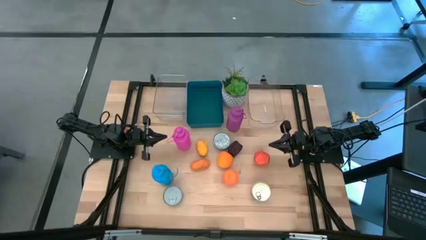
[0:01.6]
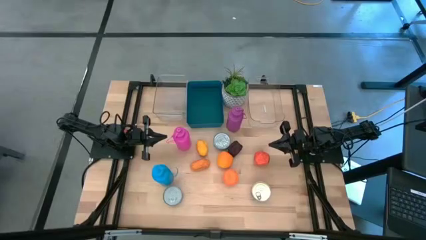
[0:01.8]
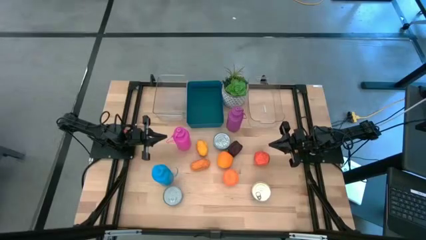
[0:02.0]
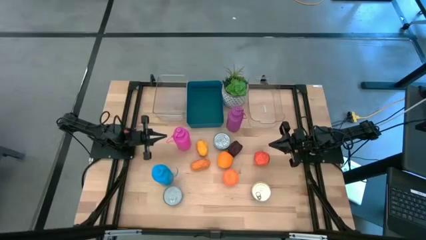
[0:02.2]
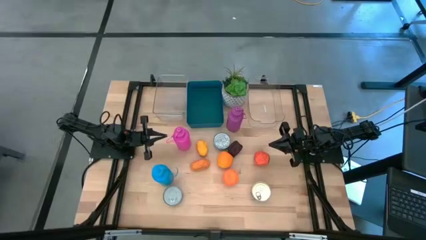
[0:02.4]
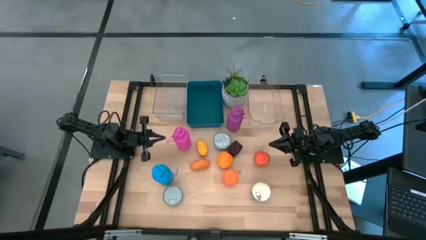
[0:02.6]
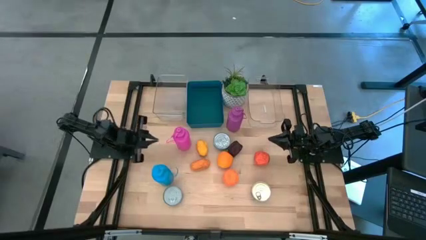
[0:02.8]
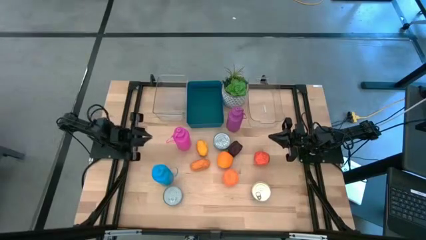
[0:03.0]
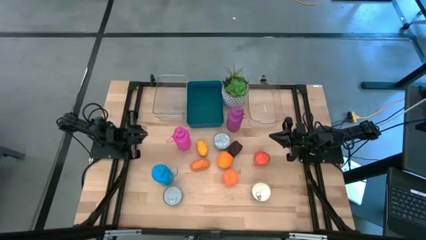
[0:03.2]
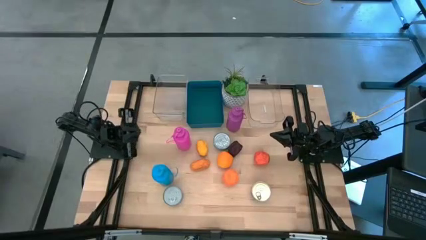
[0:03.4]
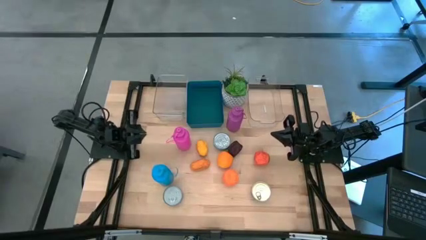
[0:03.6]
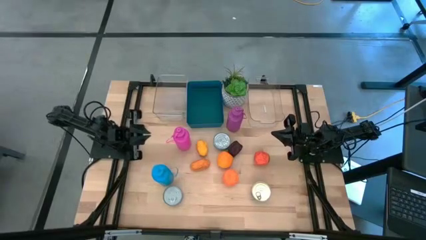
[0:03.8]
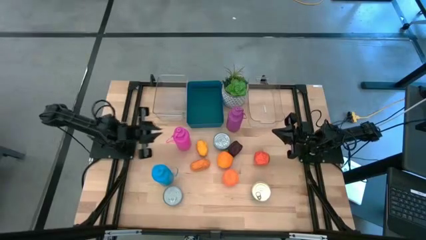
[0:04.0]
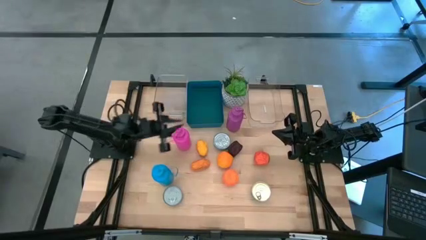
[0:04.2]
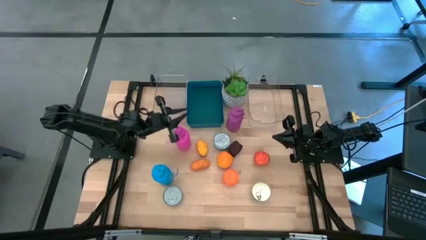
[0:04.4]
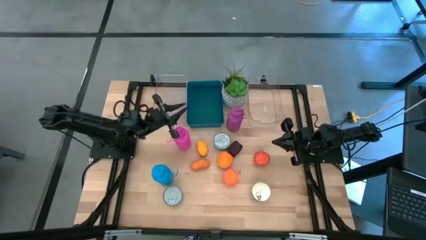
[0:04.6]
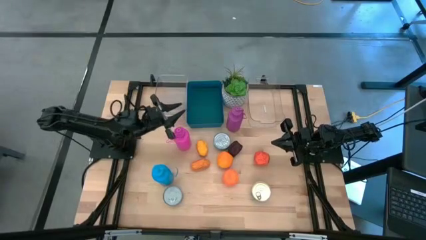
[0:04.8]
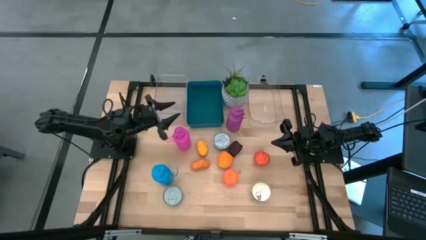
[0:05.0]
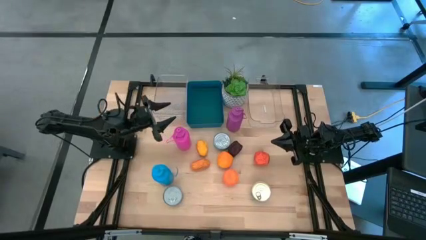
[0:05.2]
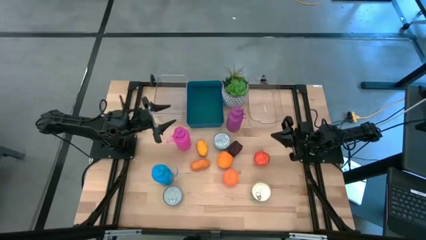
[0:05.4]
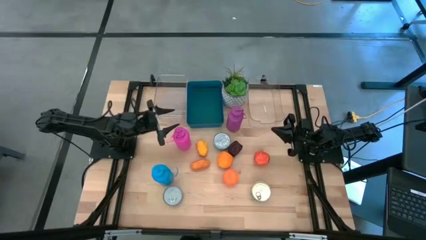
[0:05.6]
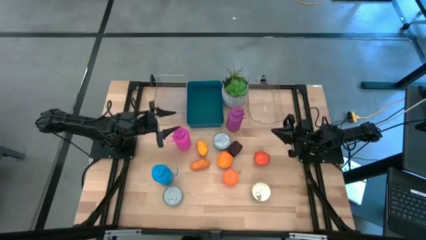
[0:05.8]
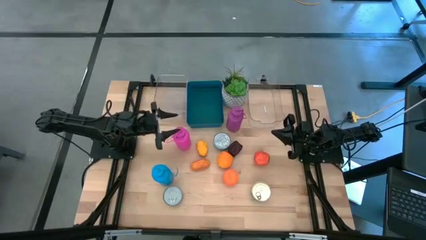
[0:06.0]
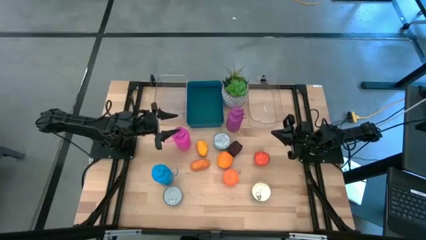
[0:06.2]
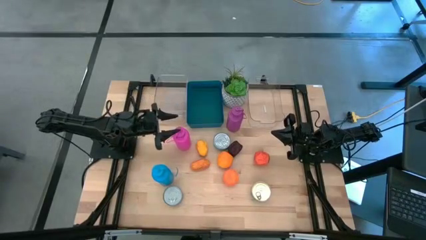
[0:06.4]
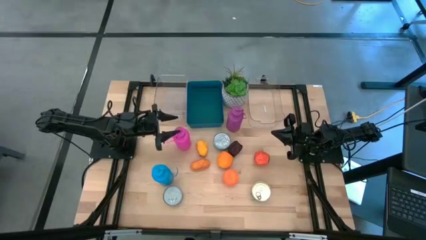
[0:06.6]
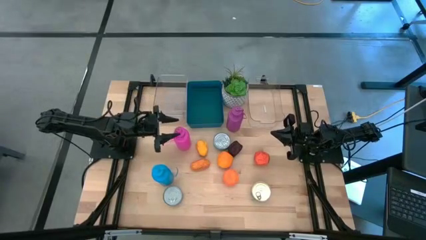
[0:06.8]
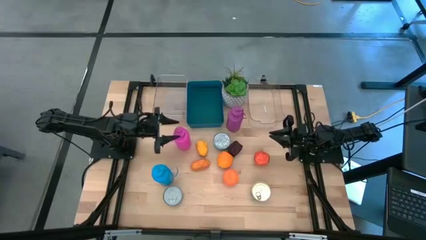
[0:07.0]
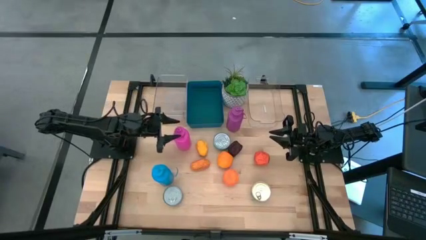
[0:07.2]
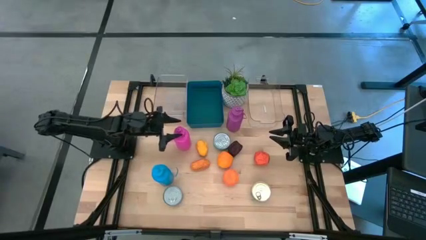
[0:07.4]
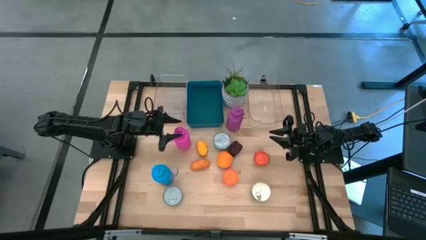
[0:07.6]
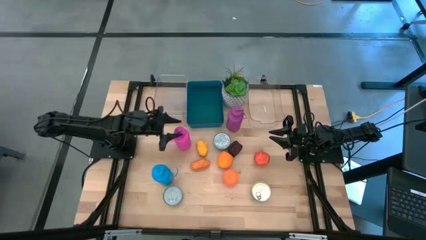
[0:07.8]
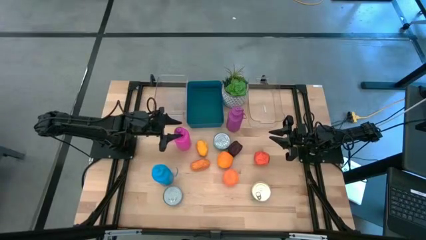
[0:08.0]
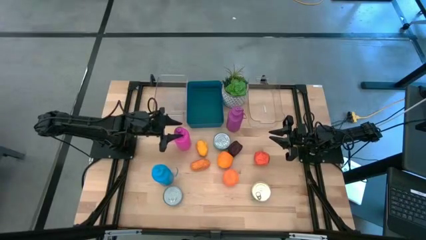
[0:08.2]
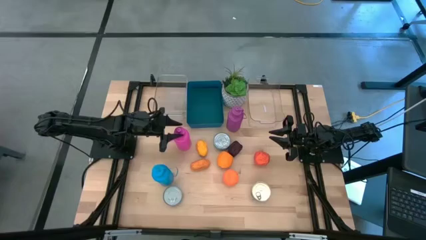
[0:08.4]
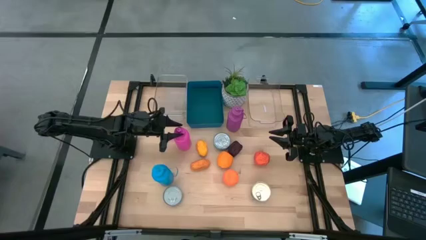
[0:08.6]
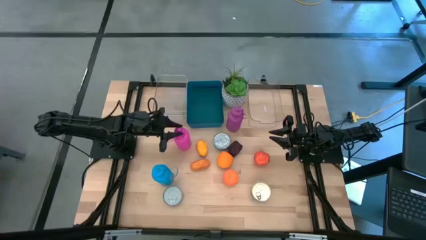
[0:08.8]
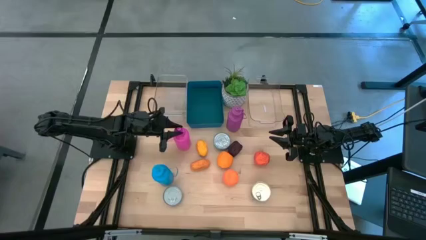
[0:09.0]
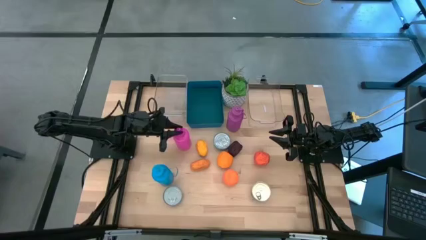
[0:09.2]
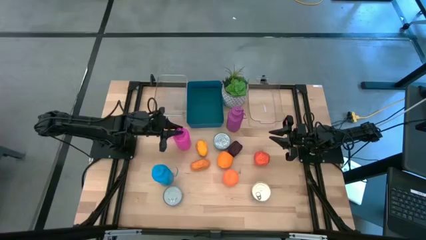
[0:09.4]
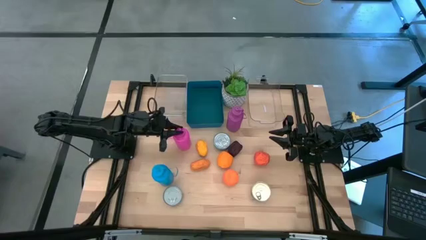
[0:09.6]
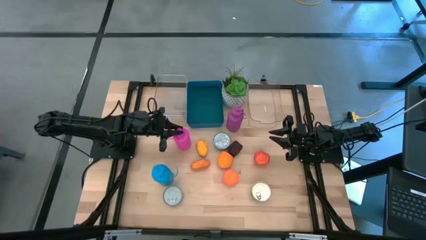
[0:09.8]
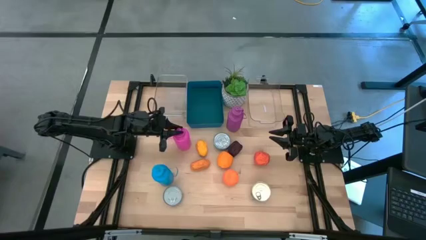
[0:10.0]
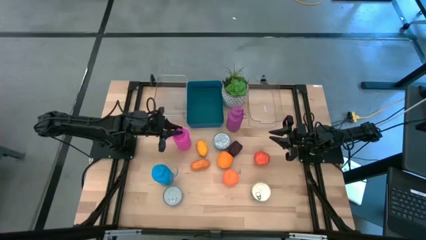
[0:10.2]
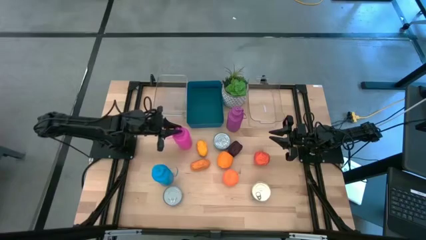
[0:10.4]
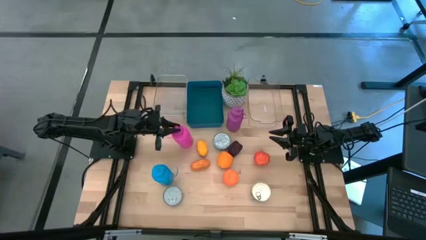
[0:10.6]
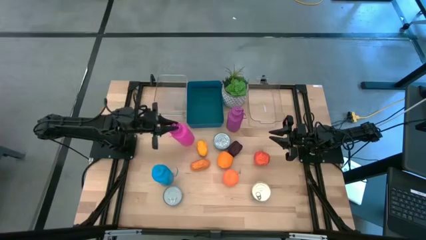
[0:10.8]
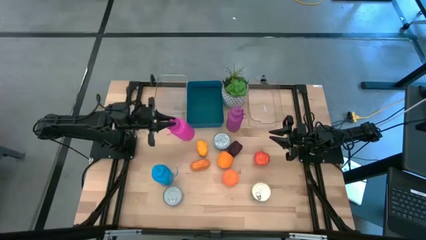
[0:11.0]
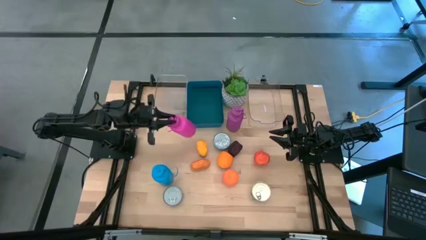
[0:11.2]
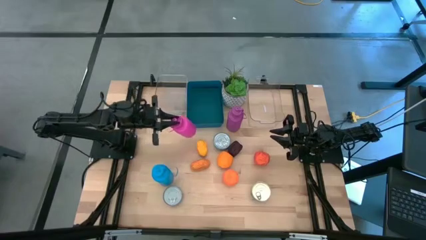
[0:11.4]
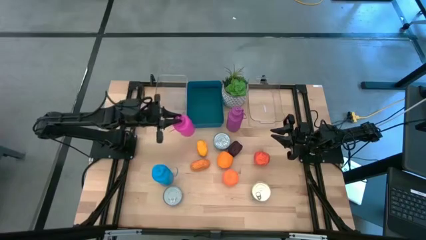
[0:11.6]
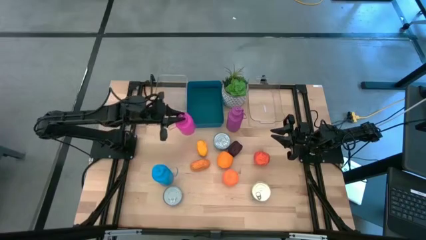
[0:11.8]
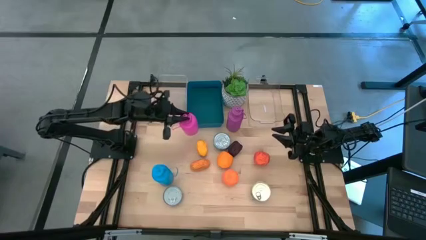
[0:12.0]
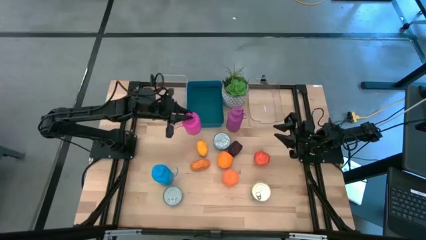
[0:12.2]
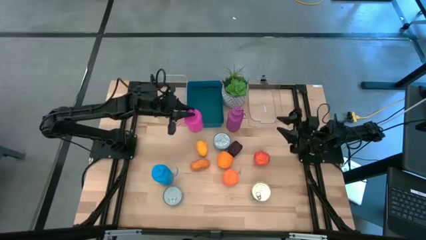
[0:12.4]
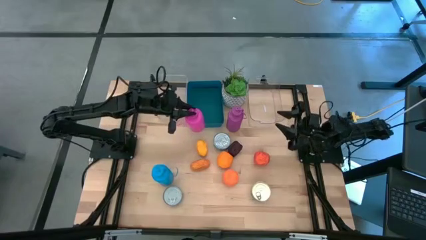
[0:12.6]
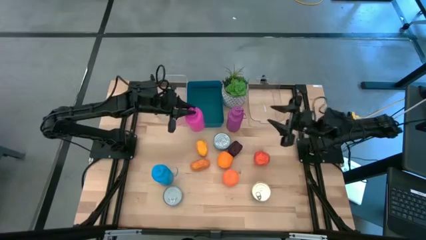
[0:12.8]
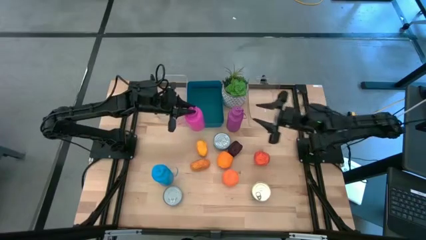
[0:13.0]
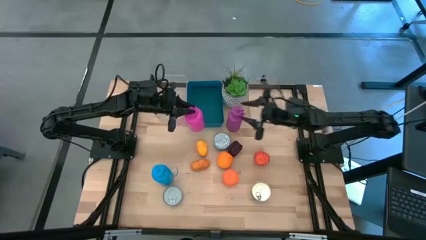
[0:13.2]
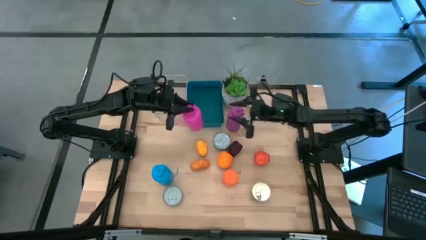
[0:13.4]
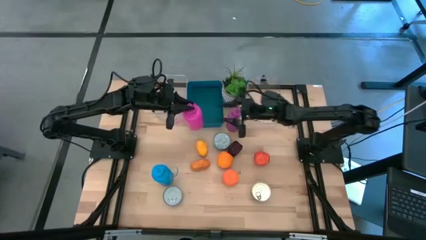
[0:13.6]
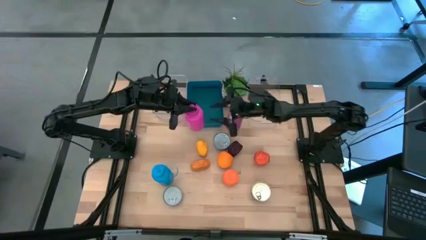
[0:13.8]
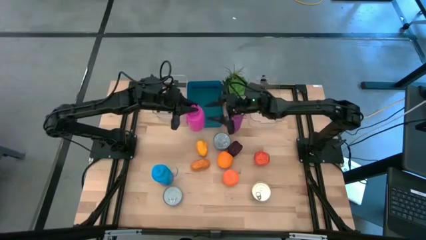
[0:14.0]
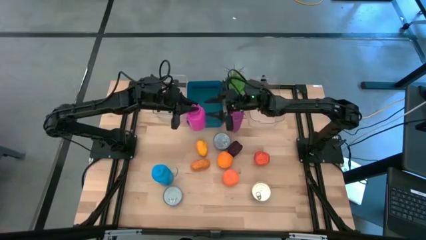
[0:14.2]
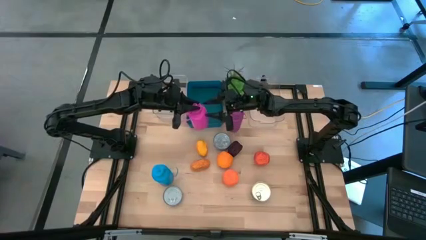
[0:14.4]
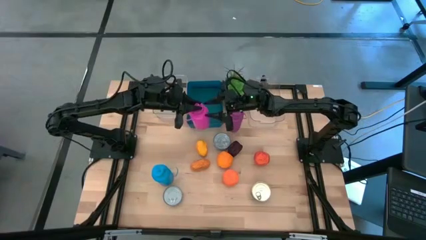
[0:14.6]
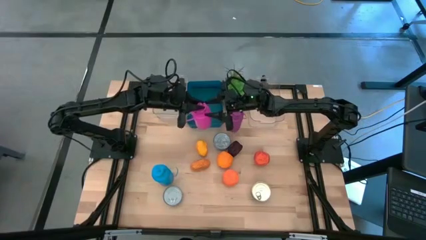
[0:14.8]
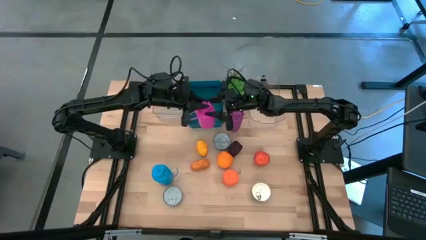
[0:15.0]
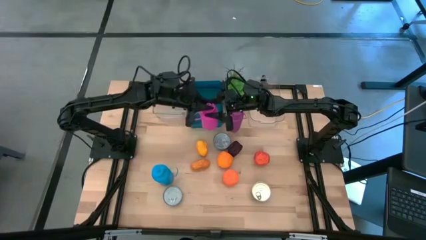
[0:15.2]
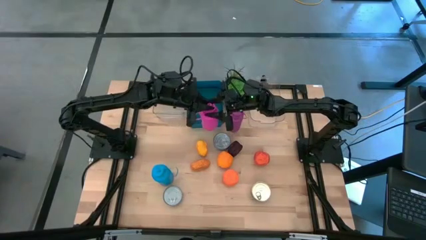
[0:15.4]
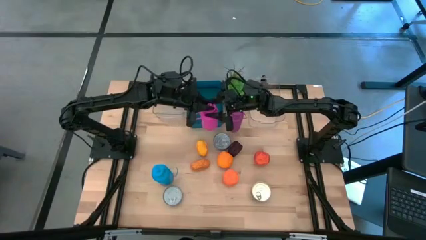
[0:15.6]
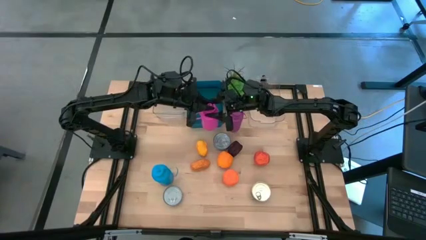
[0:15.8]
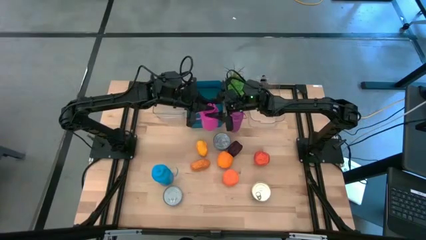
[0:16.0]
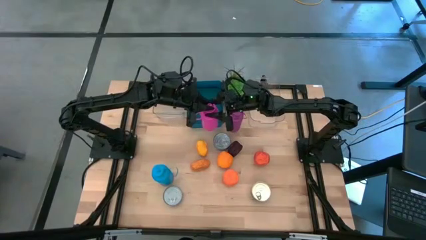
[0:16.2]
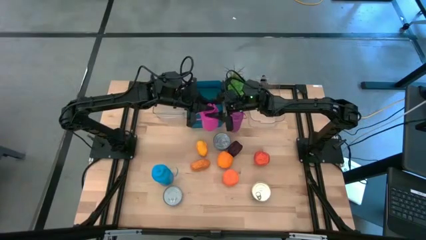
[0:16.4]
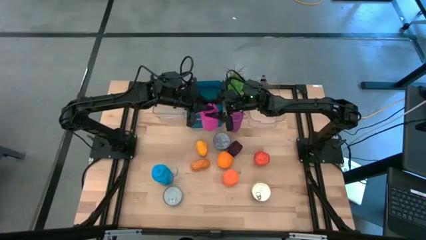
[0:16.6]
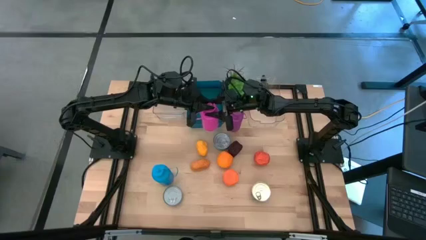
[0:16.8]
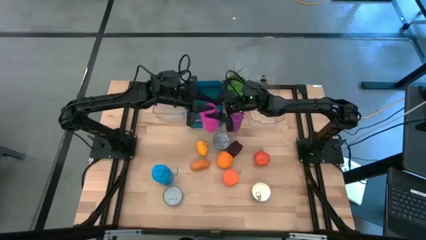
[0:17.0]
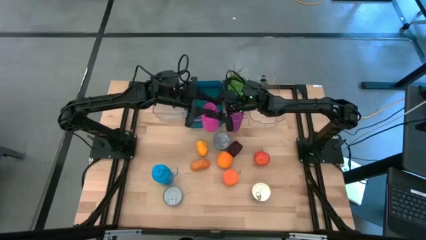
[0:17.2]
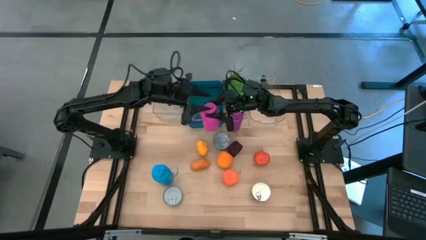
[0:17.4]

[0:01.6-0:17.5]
Task: Pick & Place Food Item
Put the pink tumbler into the right transparent bin
